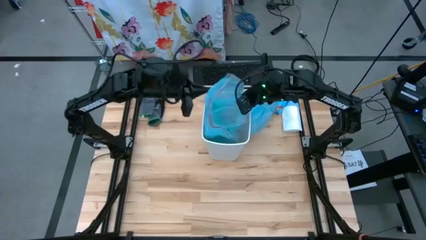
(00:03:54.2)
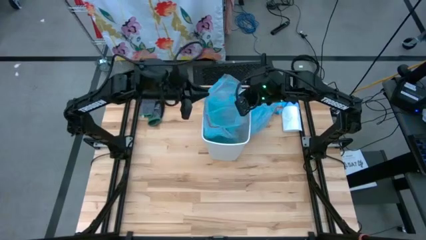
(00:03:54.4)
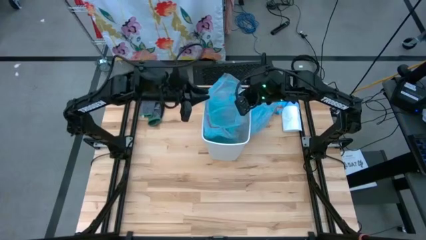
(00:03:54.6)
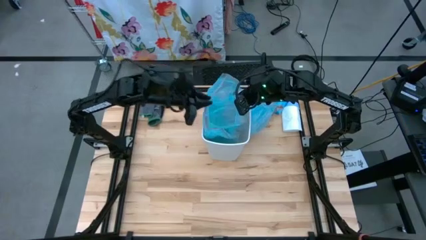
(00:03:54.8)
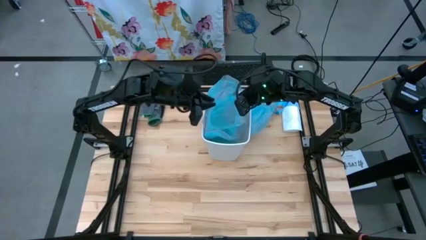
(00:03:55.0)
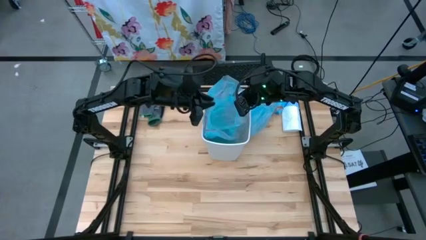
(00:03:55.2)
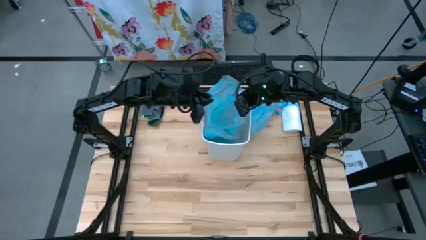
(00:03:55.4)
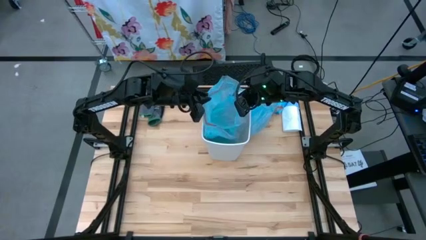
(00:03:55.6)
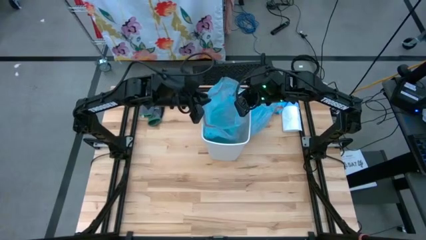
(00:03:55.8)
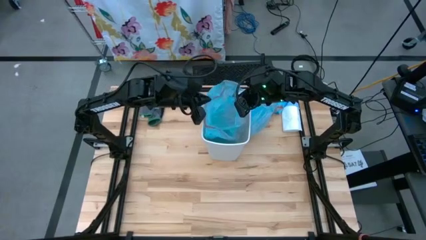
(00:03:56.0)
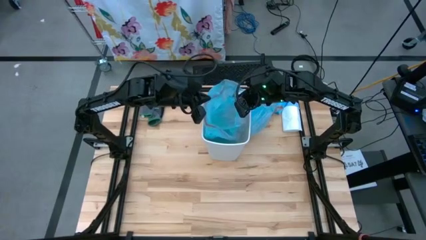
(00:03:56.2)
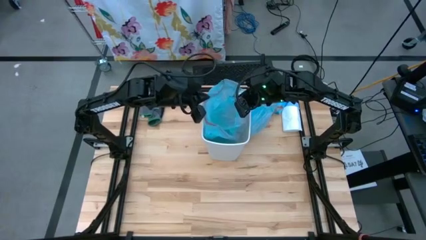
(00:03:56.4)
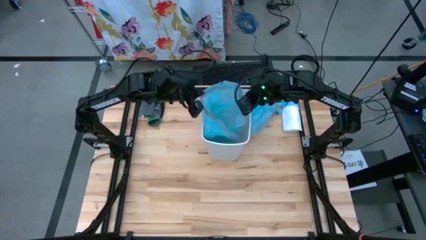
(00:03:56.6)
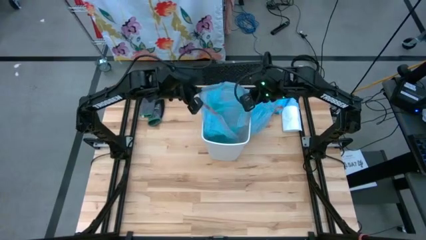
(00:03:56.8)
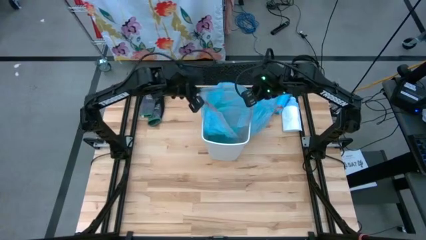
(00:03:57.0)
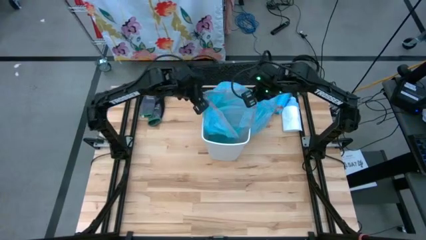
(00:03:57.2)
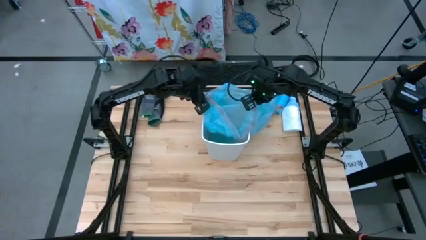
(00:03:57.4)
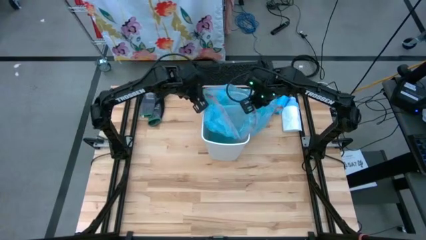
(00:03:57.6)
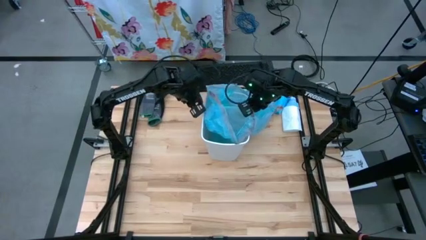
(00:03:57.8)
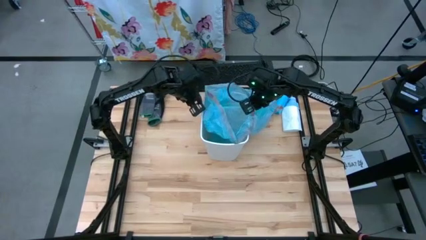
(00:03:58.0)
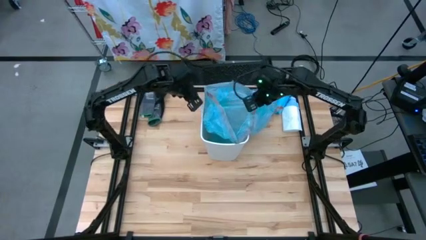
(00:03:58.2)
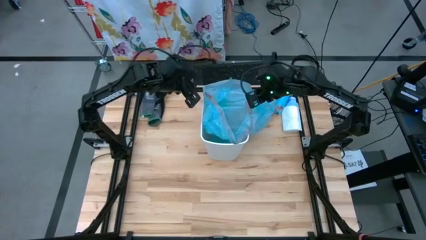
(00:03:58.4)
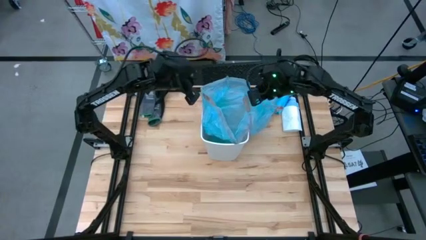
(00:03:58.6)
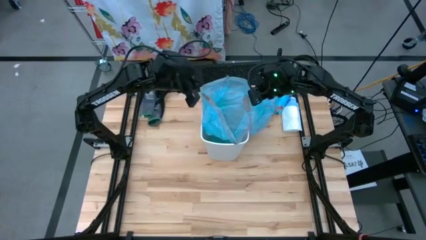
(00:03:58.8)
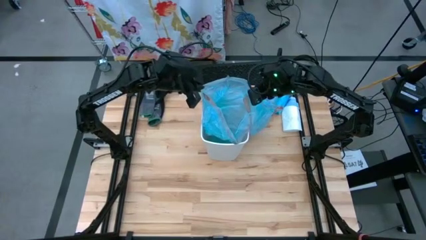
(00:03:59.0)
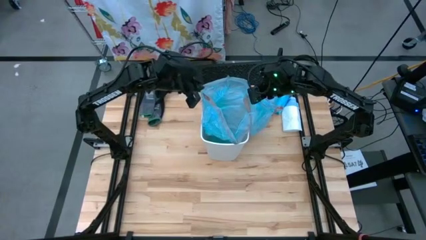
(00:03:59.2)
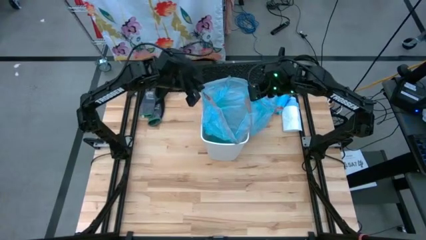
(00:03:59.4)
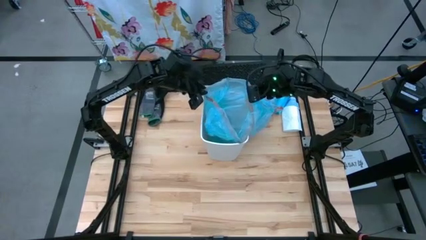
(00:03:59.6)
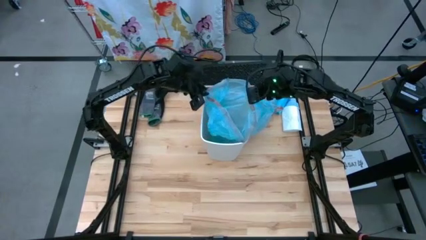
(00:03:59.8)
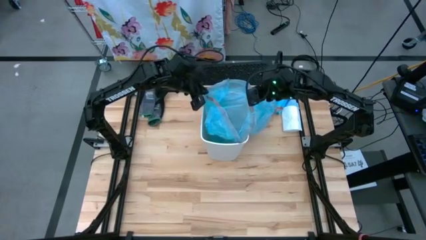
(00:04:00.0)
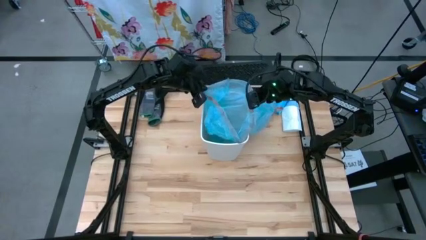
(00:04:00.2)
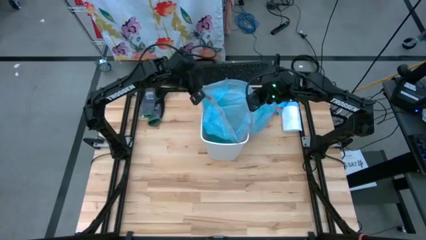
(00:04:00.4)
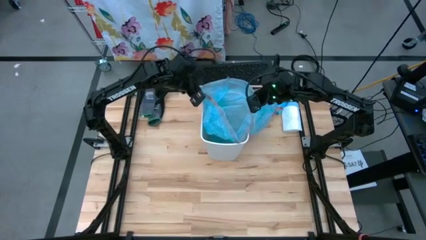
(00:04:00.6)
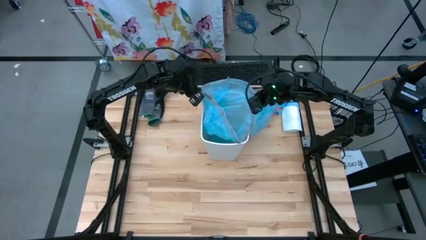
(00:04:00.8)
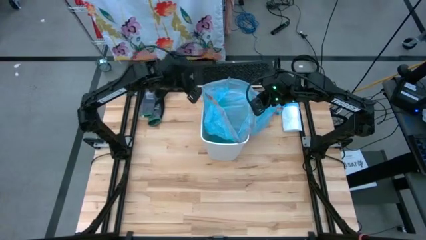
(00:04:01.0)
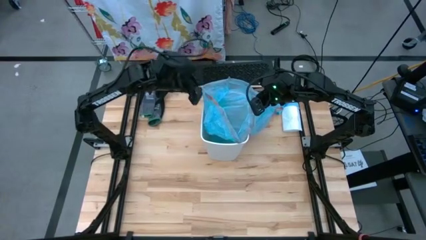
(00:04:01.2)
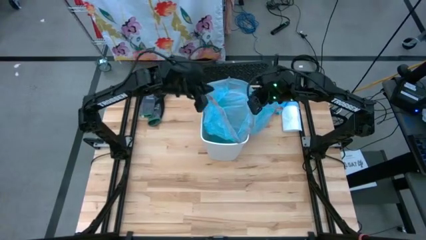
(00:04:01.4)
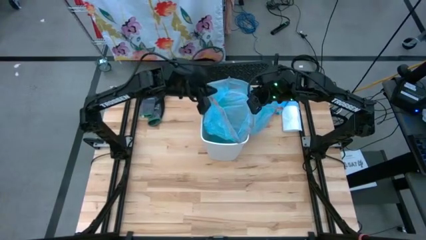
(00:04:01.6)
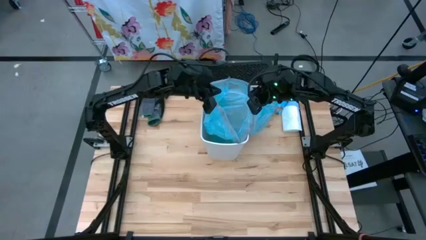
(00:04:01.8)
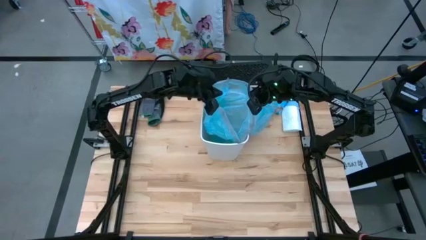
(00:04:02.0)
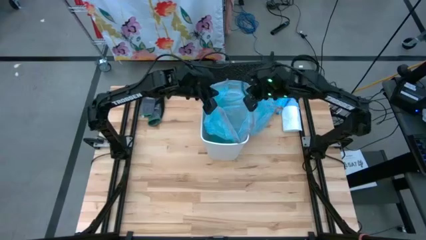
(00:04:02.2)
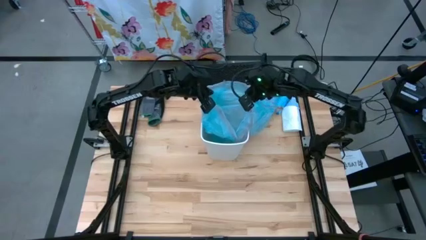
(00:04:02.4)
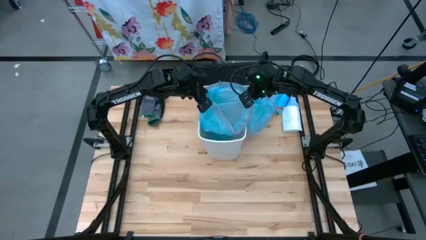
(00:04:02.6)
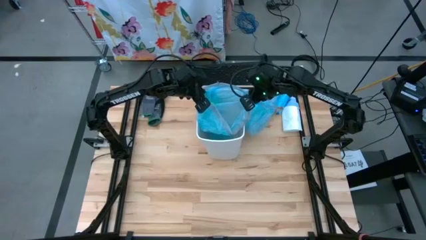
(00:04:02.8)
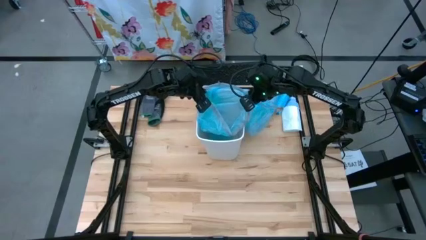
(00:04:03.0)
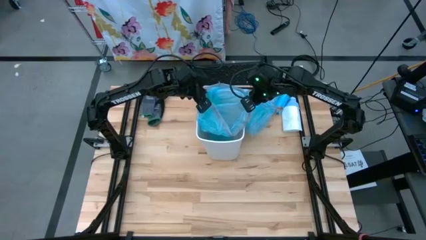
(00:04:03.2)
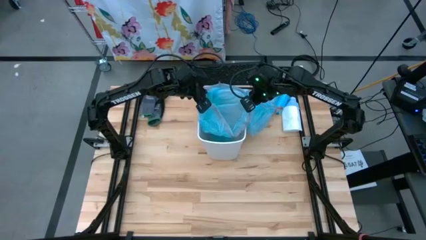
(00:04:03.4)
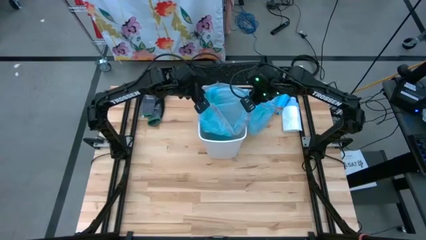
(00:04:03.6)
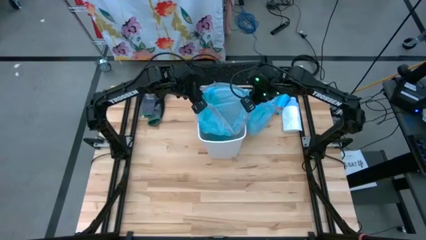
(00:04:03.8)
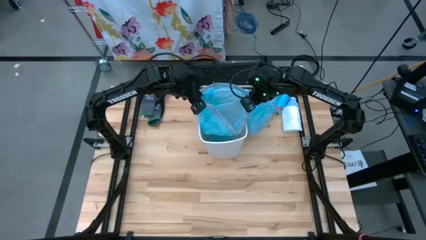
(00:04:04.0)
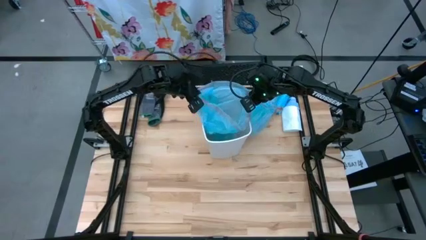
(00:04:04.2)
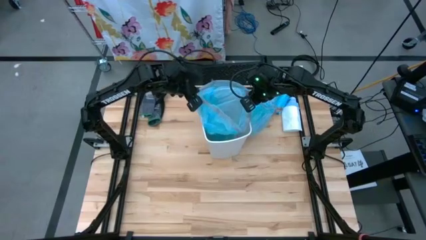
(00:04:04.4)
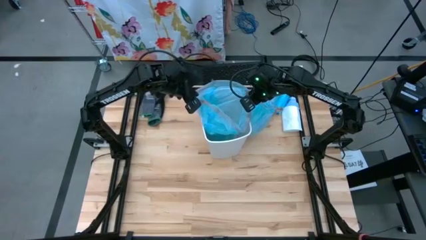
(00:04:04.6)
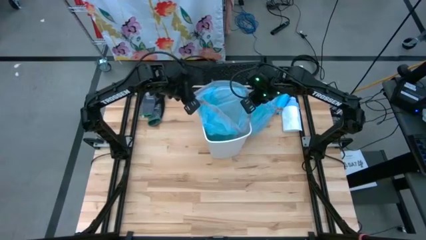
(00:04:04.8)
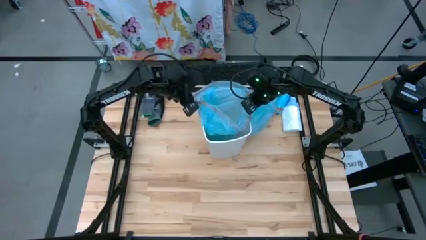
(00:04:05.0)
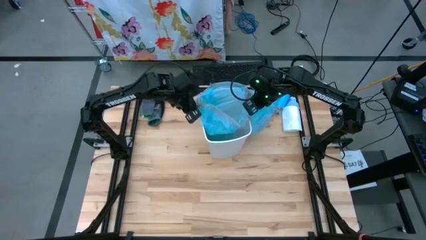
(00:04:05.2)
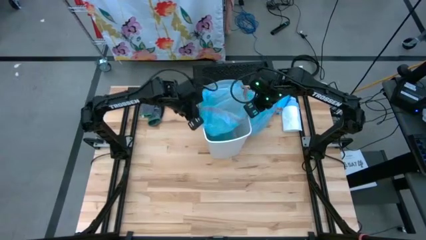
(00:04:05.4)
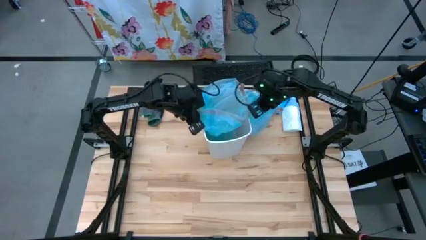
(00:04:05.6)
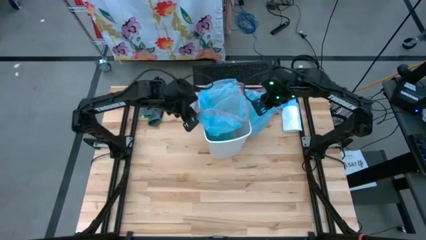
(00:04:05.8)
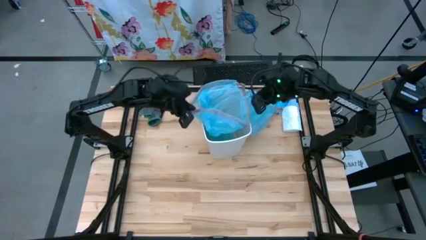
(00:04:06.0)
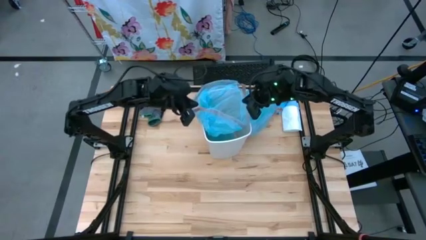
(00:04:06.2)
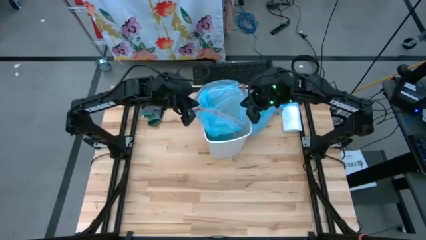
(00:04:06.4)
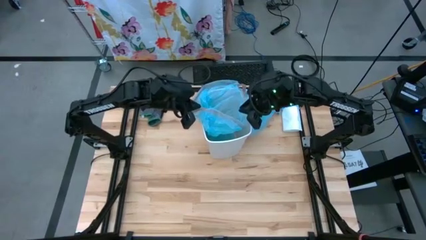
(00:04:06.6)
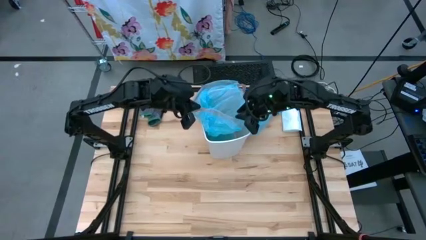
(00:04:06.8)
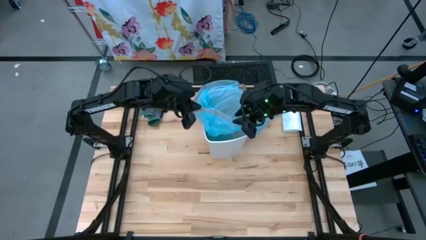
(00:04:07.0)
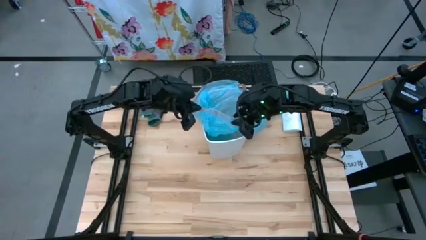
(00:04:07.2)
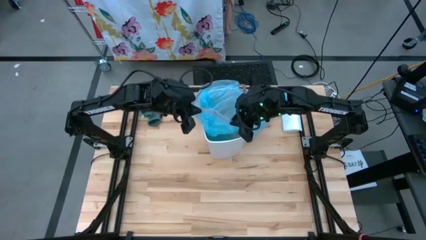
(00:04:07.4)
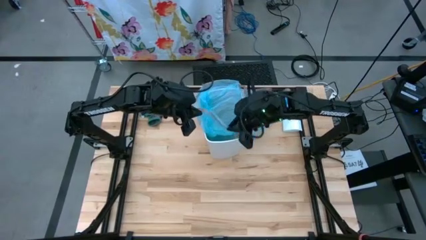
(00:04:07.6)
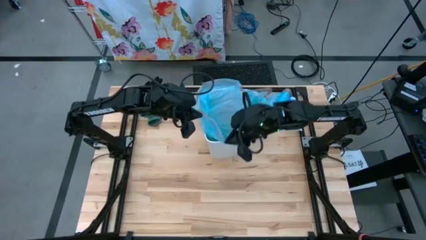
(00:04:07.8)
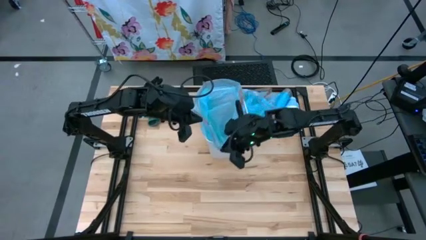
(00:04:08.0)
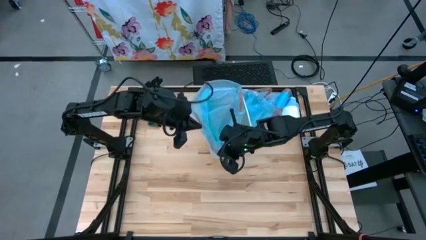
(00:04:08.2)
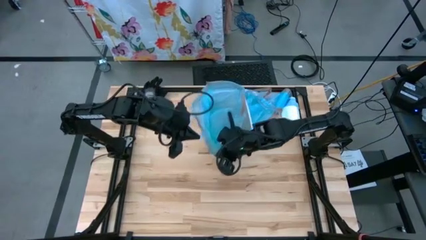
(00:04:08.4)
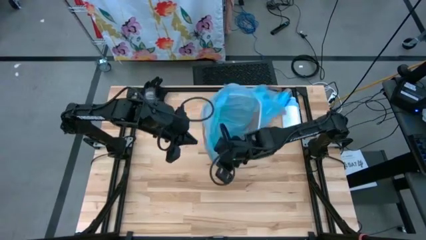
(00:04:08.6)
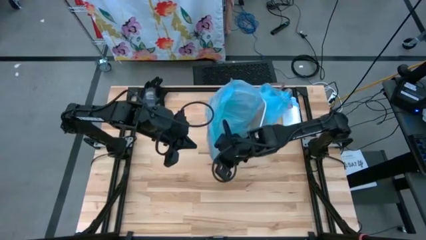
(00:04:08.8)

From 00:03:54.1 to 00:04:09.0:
Task: place trash/remove bag and relplace
Insert the new blue trash bag into the trash bin
